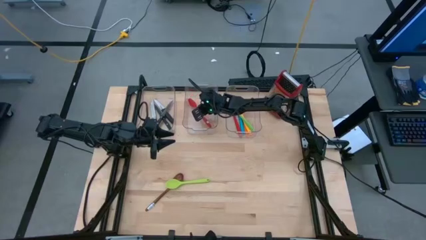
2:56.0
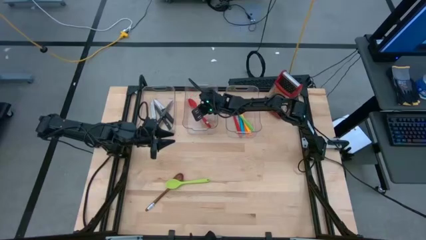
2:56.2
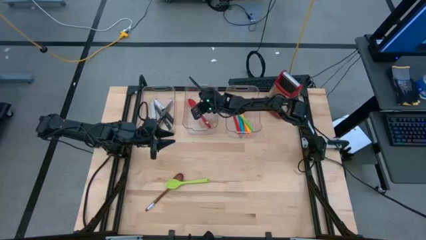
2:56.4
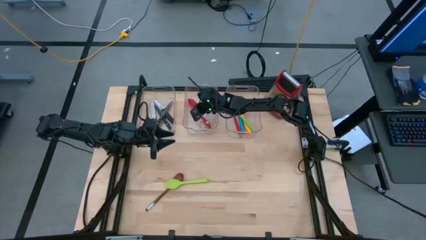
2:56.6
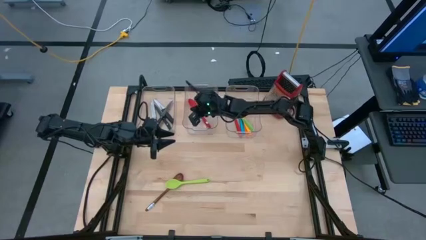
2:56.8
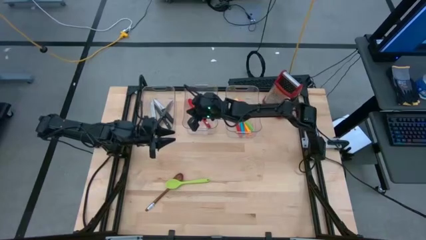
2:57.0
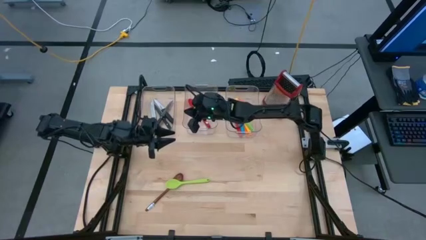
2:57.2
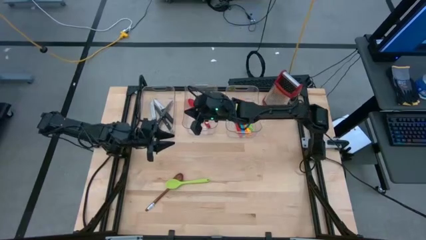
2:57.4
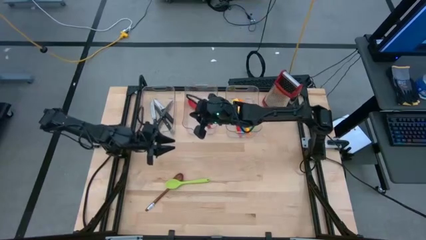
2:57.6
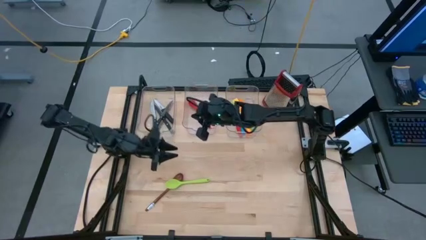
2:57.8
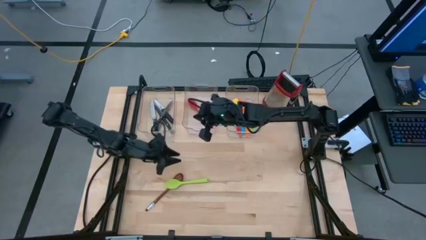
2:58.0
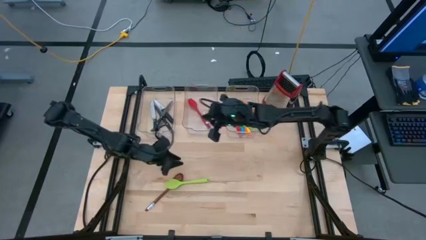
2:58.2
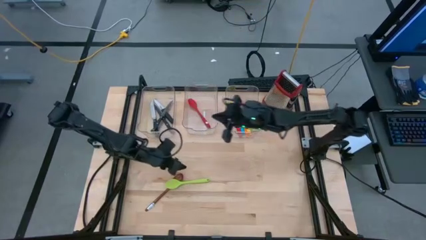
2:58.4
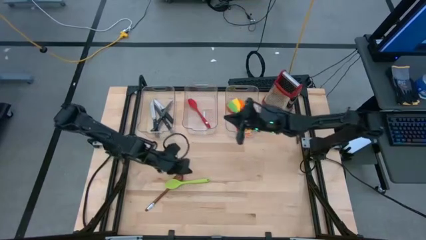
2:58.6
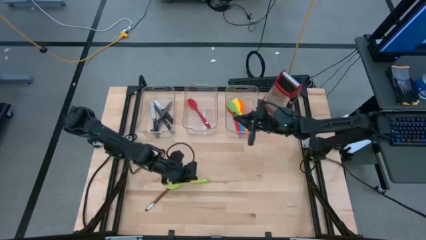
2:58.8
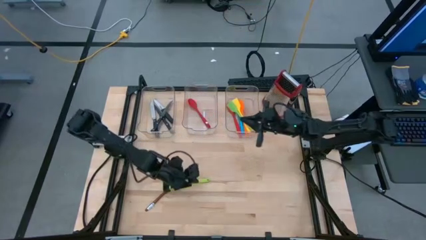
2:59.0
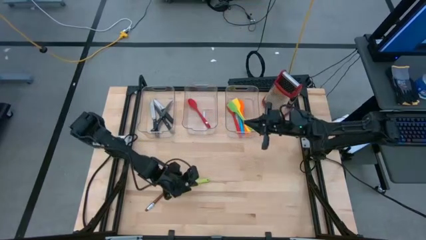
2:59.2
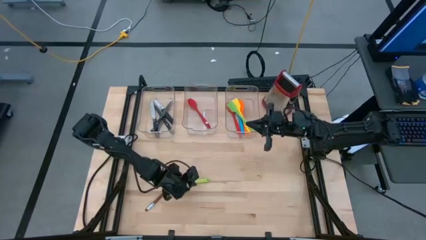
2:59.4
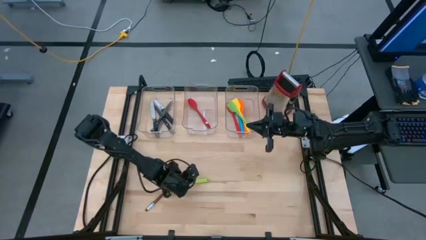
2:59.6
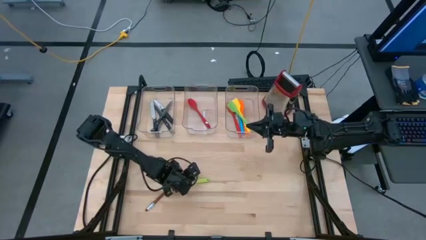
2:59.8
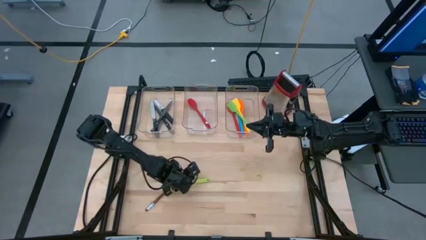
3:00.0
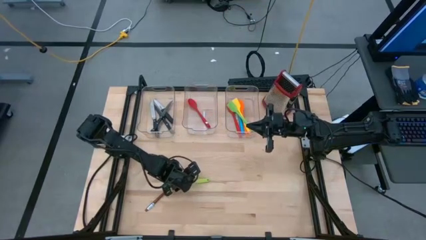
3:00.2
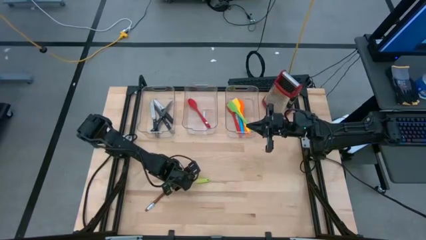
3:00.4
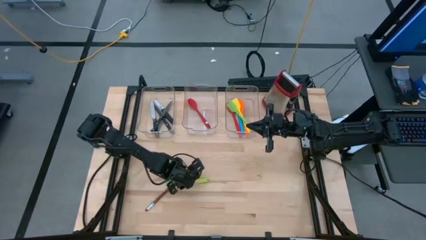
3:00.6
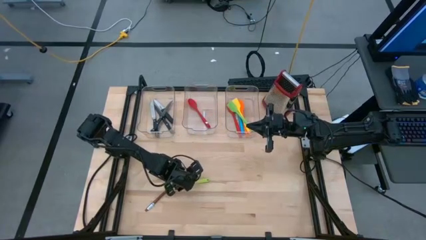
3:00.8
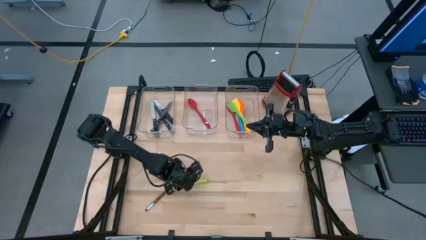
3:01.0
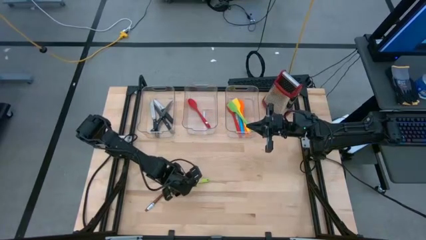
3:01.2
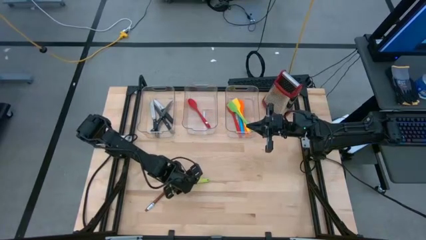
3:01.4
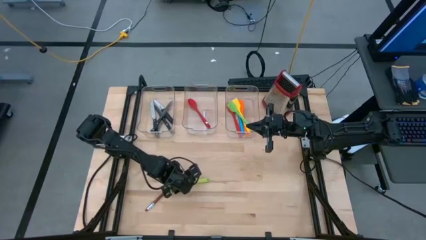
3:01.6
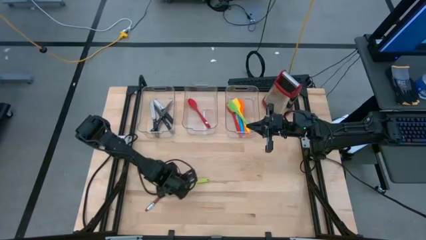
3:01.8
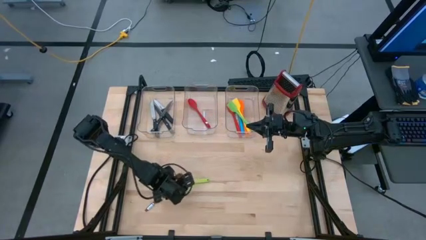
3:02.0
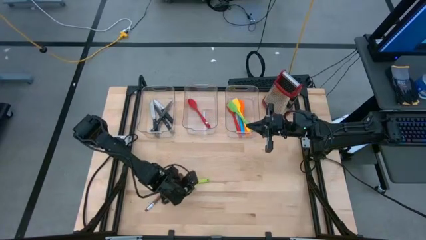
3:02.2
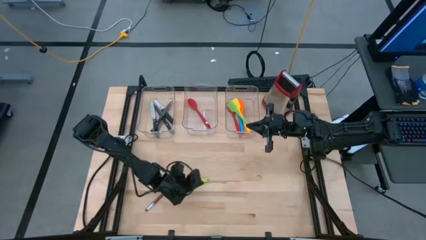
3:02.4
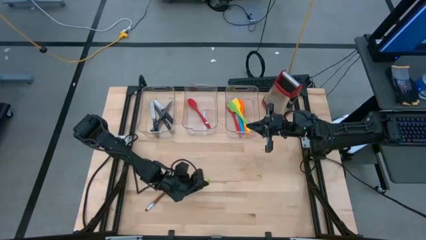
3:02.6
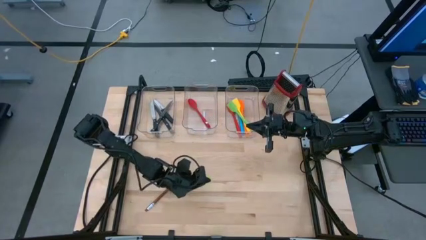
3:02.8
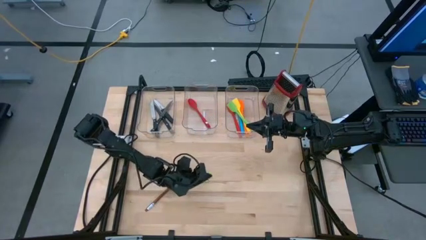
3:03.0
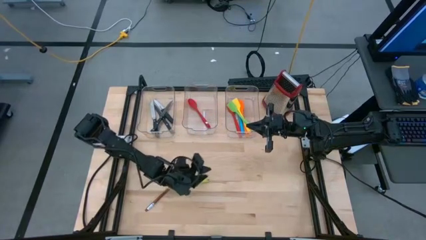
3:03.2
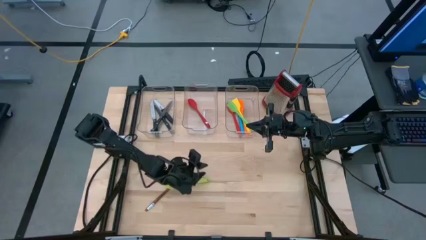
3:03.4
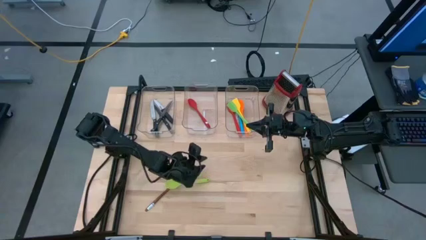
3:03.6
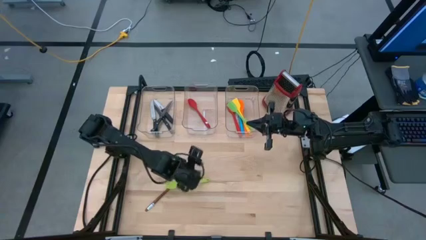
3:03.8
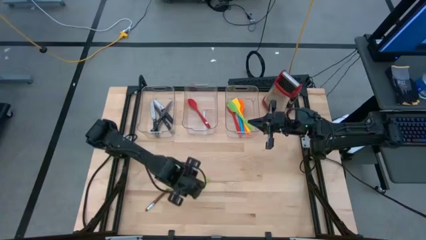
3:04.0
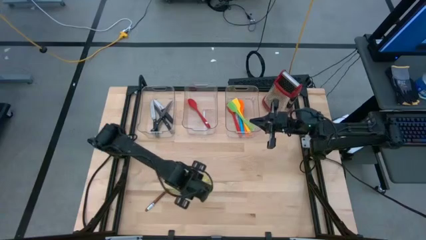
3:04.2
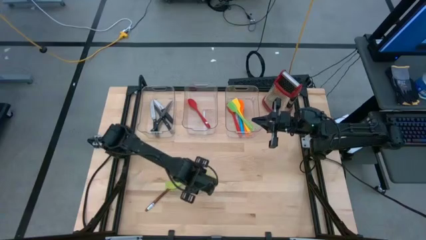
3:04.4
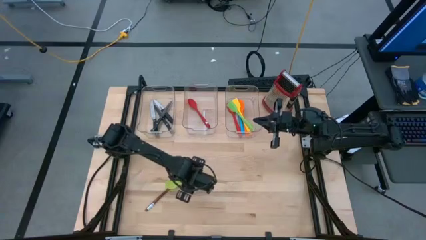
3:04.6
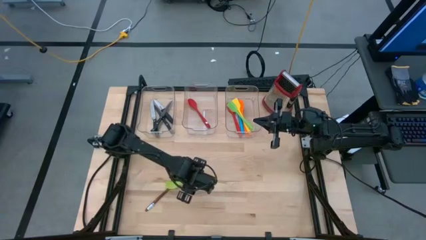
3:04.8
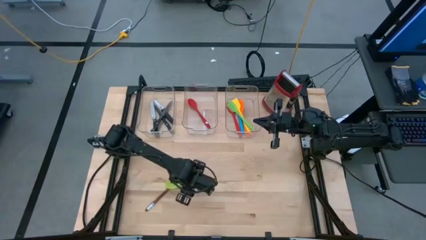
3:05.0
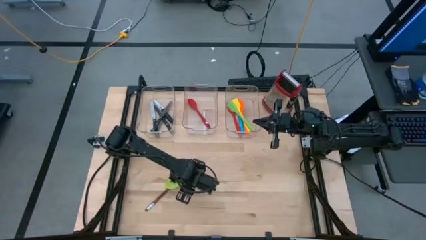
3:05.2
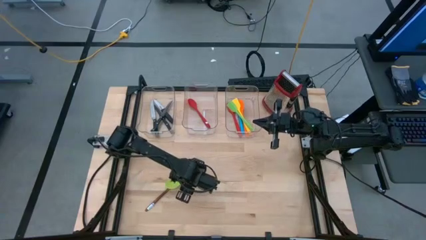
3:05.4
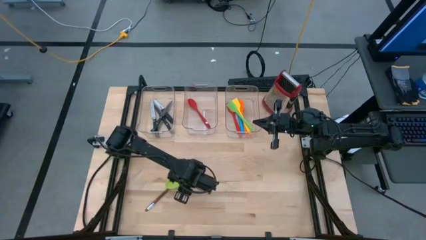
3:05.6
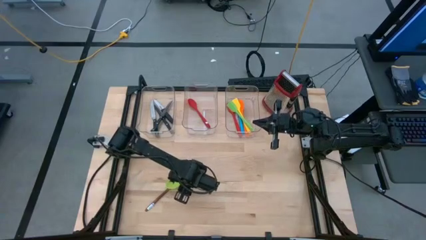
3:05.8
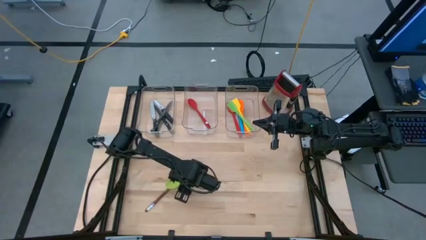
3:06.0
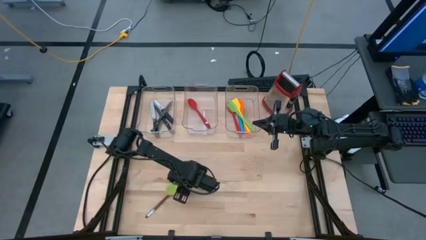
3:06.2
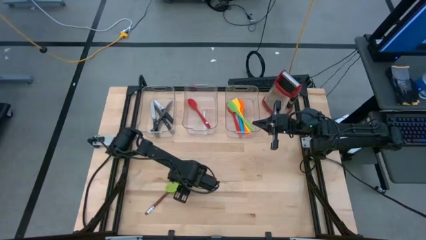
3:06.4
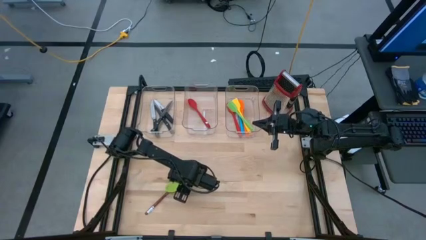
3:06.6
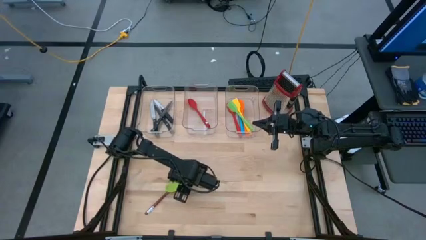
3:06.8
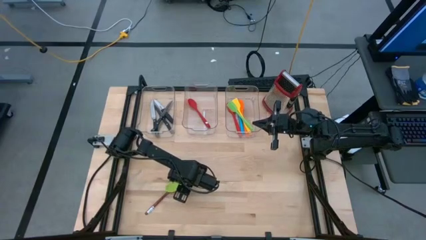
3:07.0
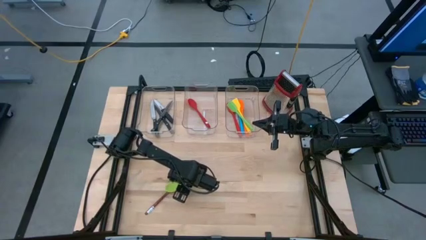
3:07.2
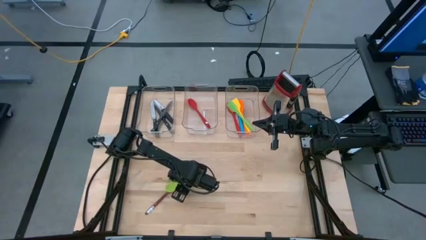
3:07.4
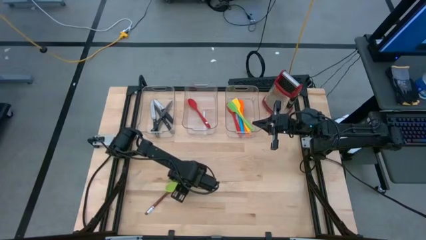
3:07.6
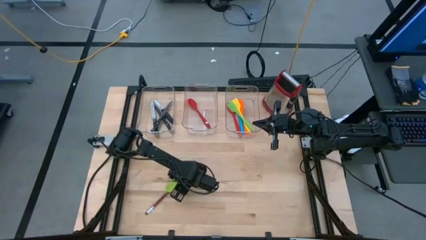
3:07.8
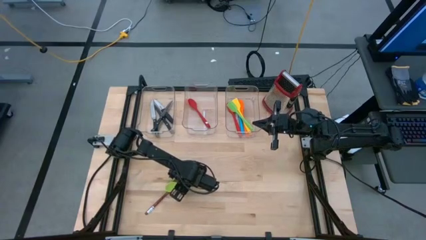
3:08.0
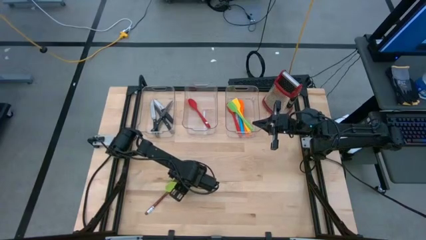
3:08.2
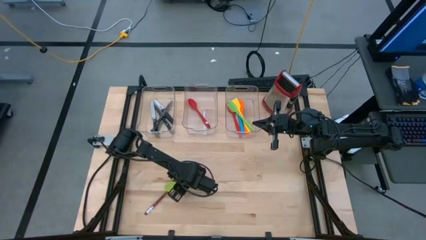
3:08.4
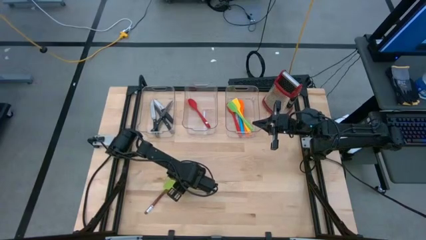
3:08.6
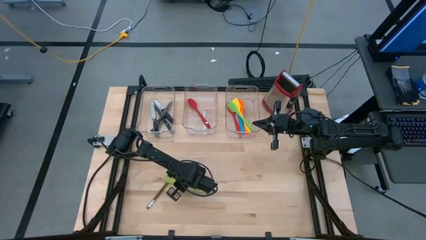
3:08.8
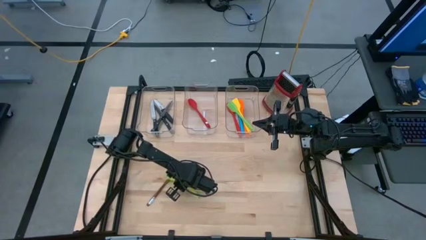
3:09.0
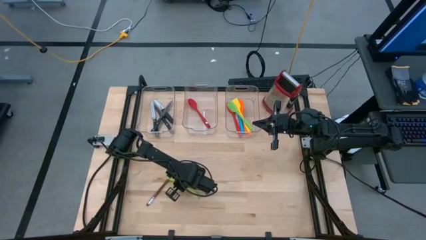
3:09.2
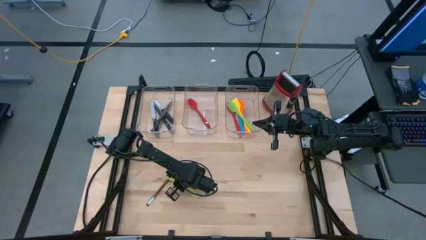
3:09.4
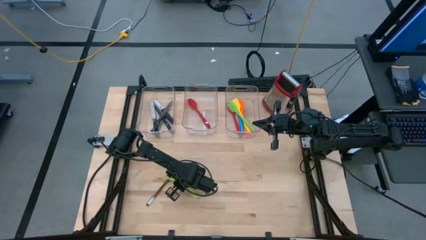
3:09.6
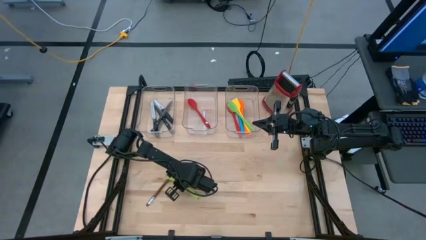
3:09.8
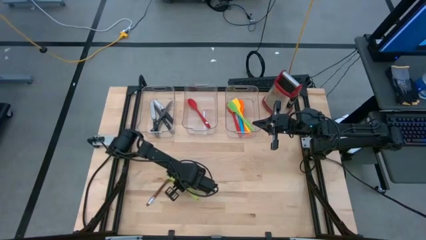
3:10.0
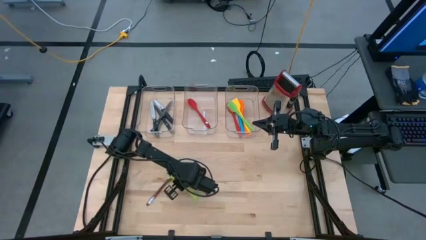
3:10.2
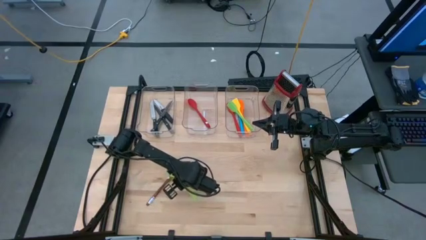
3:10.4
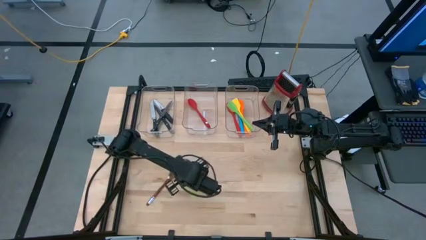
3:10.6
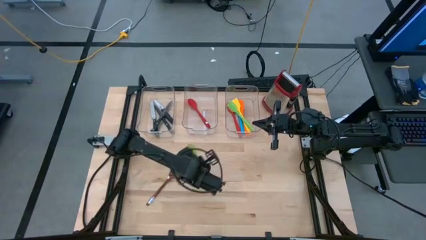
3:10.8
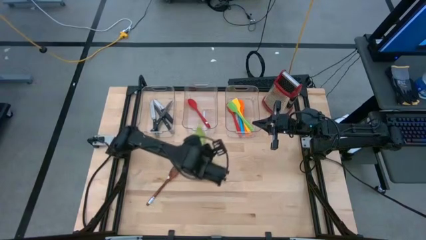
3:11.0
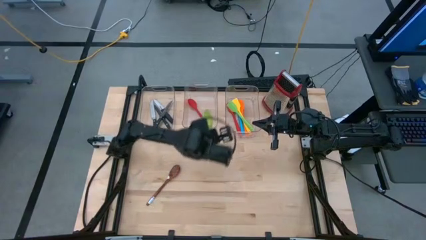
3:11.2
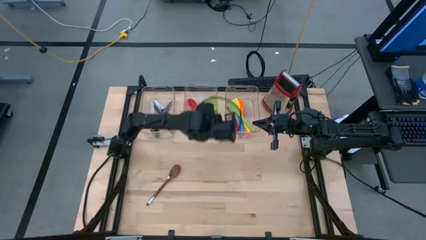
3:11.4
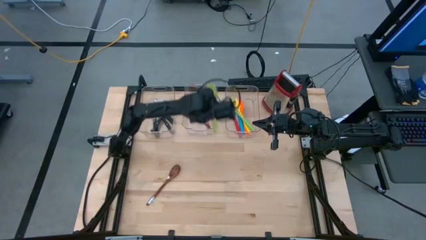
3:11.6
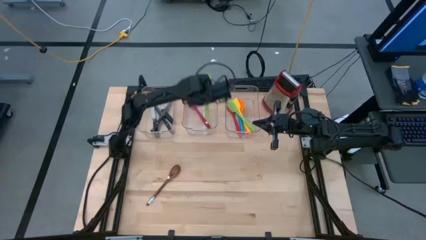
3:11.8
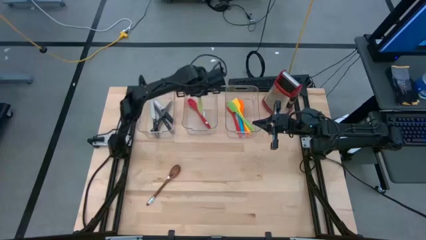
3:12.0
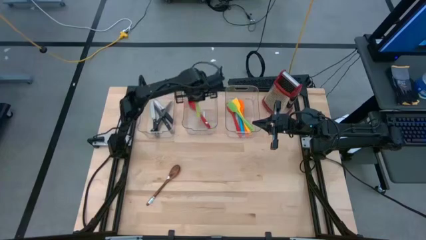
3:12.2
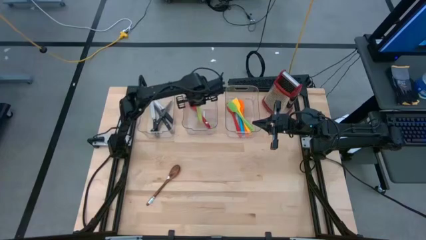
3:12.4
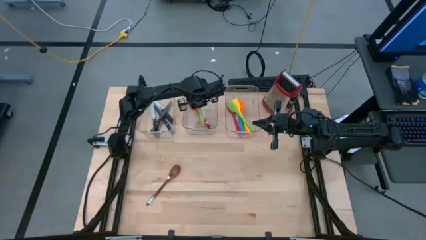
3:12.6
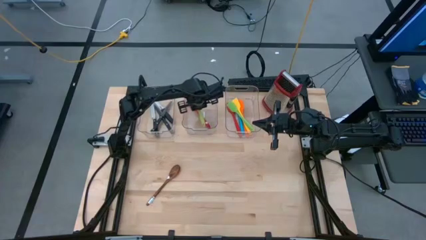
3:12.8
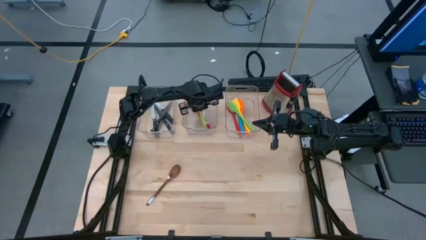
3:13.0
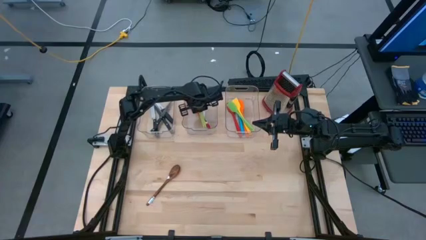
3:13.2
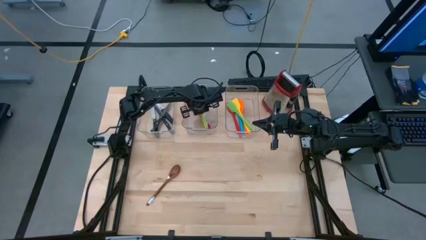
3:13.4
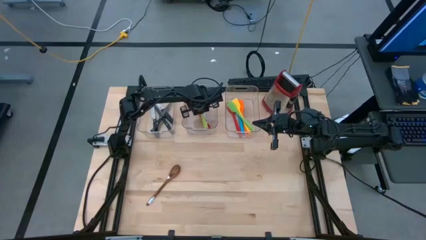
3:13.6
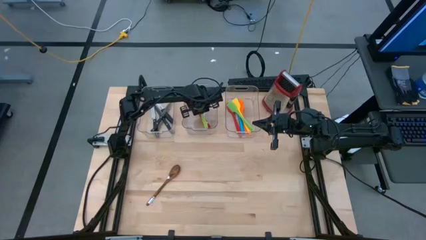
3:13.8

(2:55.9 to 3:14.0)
Task: Pick & Place Kitchen Items
Put the green serving spoon into the middle transparent bin
